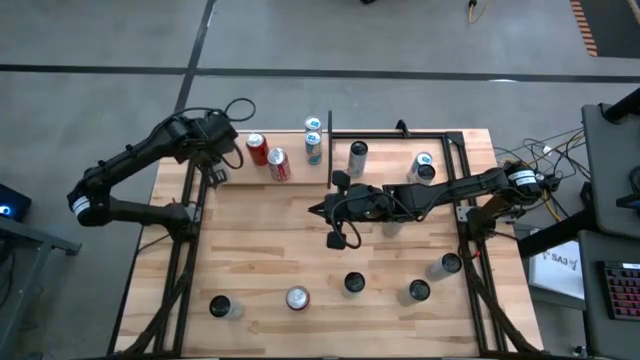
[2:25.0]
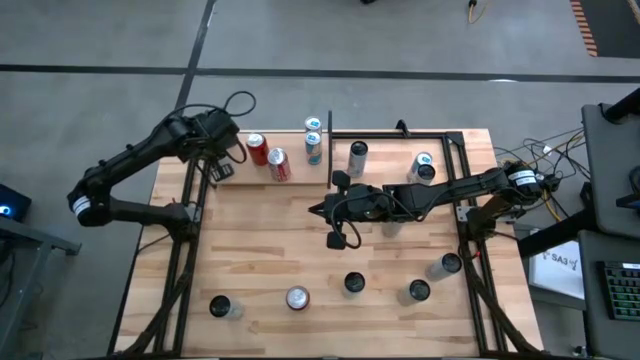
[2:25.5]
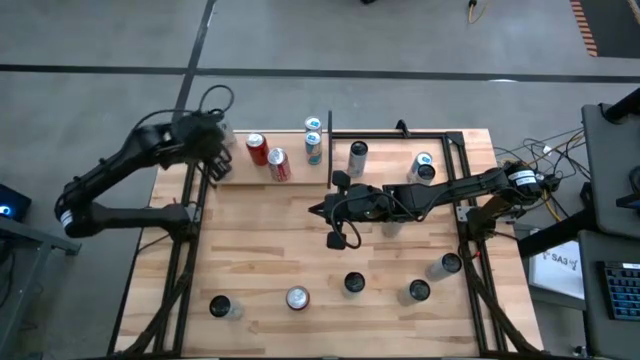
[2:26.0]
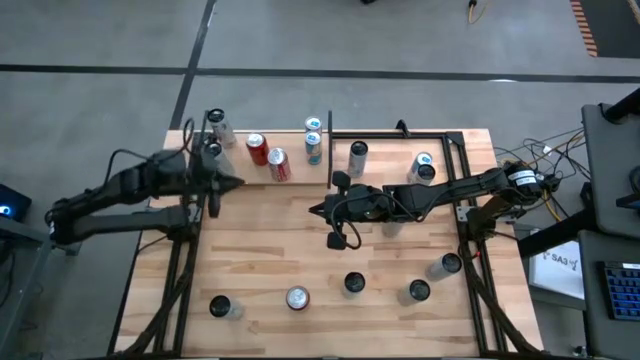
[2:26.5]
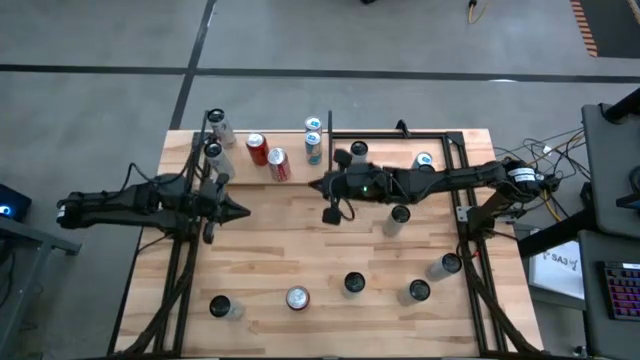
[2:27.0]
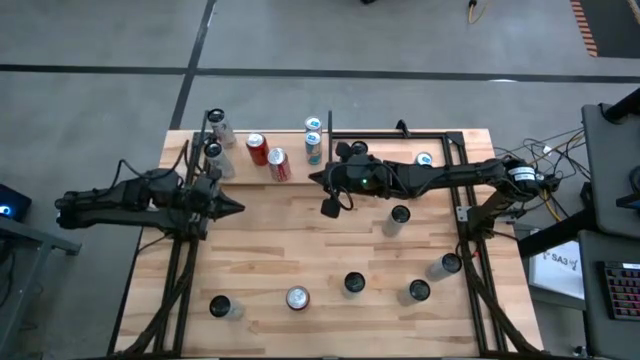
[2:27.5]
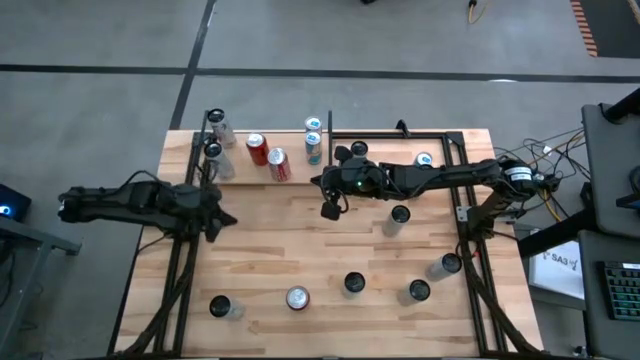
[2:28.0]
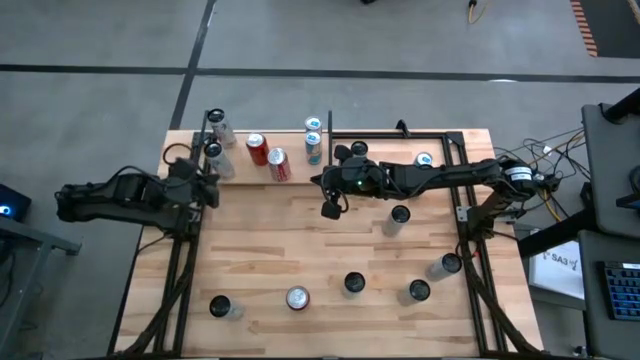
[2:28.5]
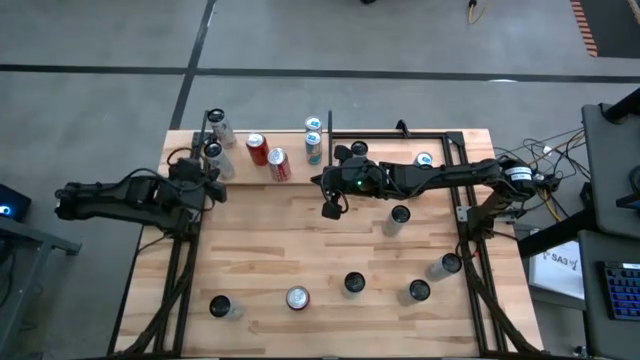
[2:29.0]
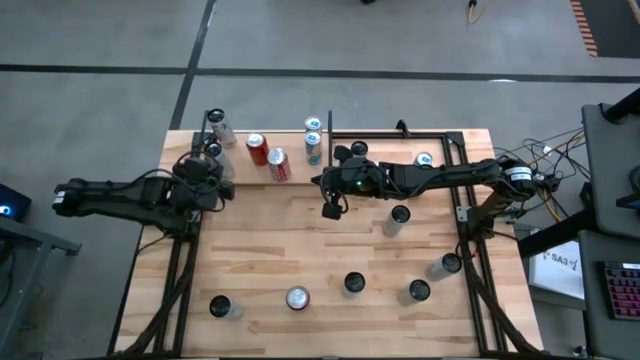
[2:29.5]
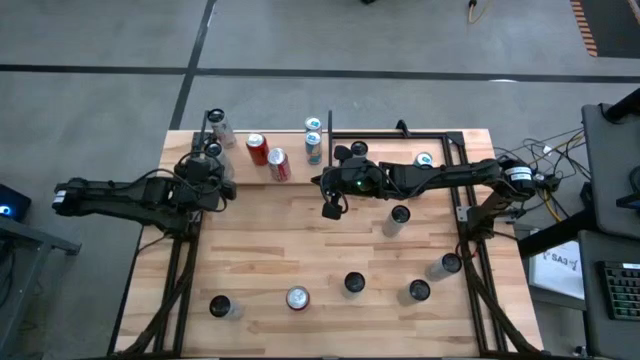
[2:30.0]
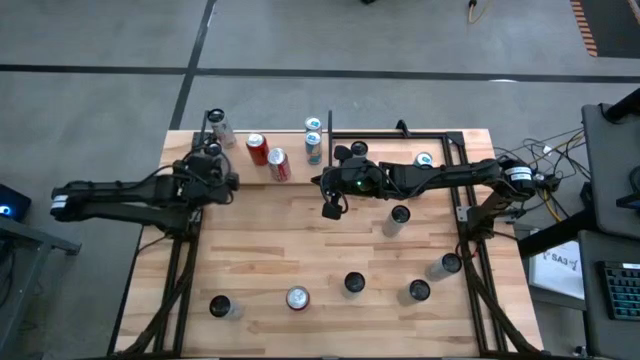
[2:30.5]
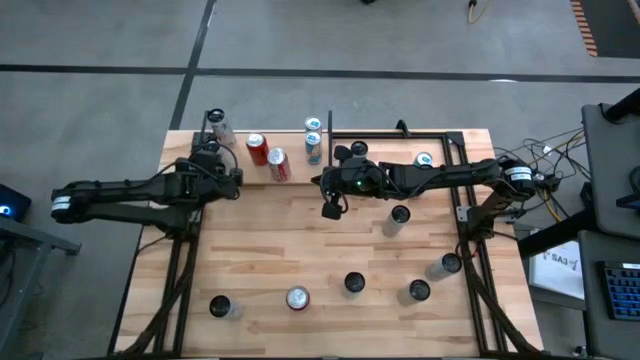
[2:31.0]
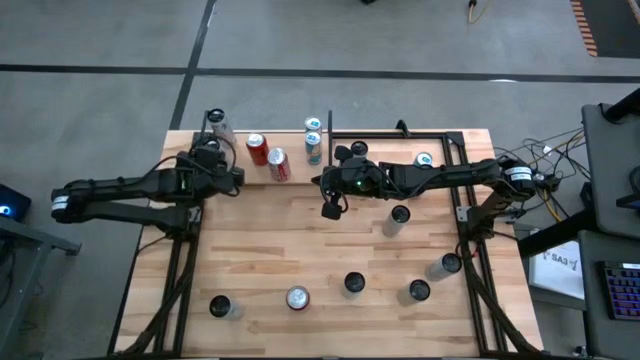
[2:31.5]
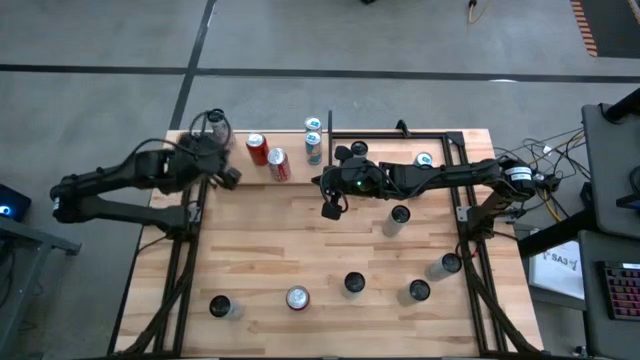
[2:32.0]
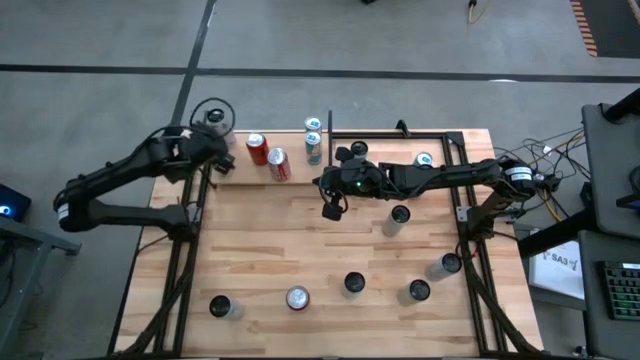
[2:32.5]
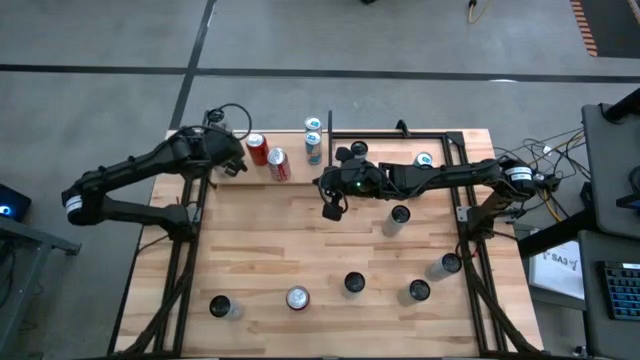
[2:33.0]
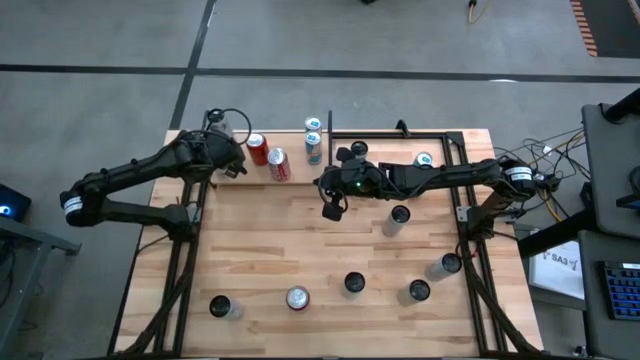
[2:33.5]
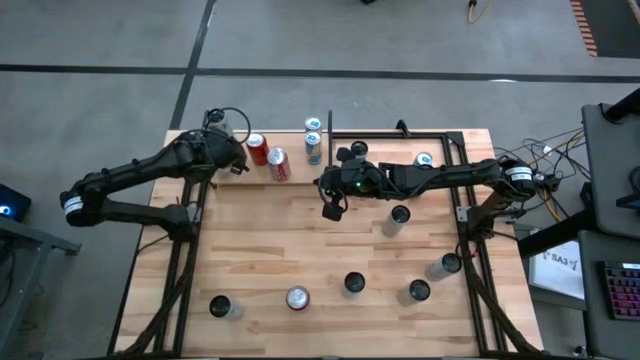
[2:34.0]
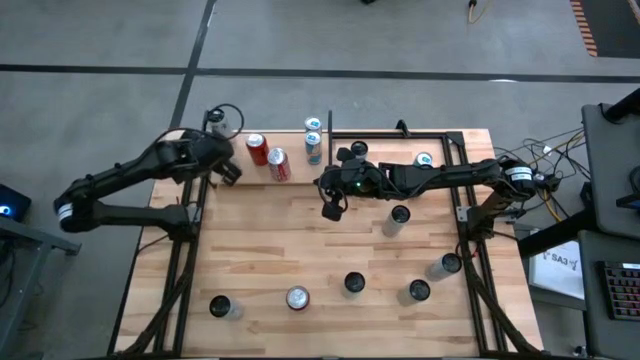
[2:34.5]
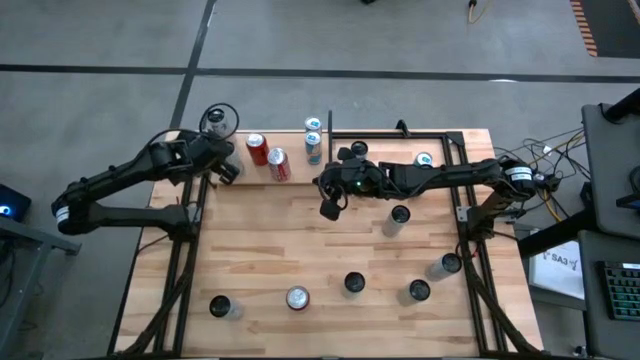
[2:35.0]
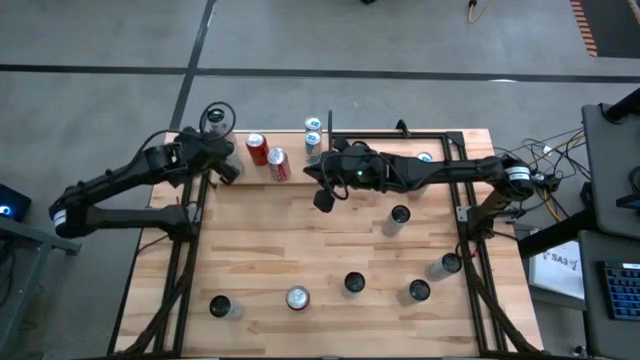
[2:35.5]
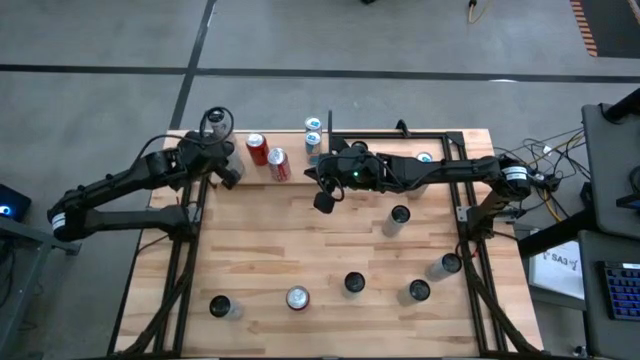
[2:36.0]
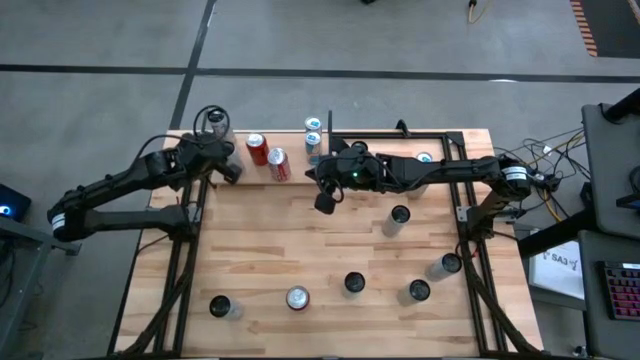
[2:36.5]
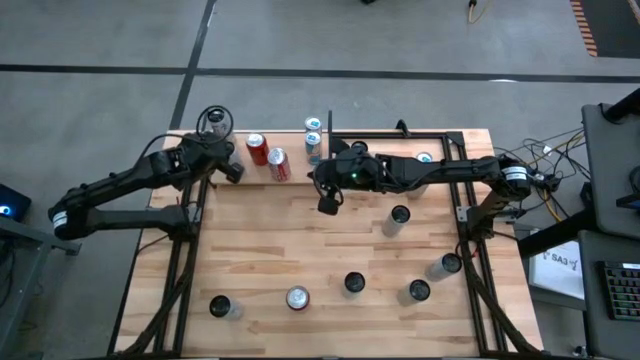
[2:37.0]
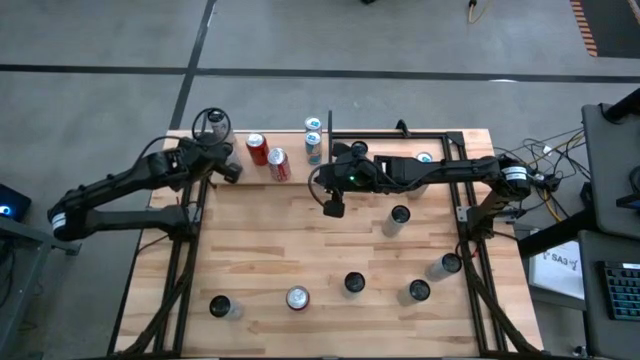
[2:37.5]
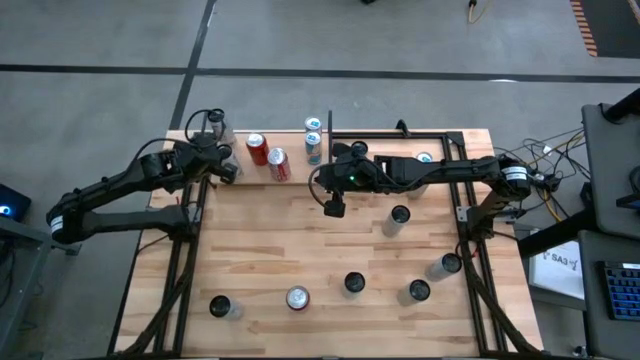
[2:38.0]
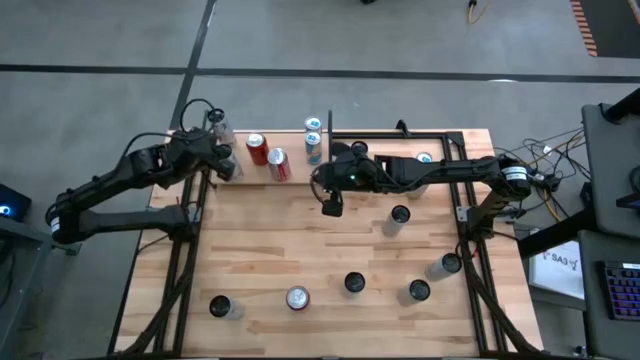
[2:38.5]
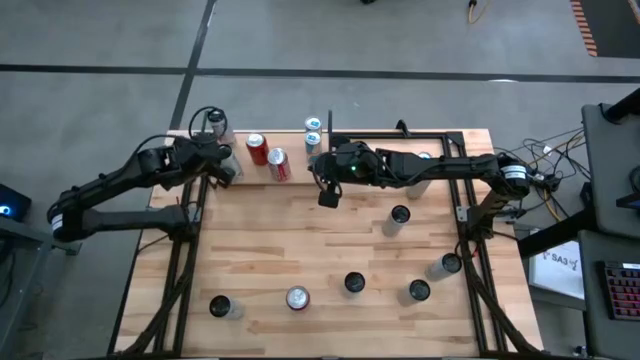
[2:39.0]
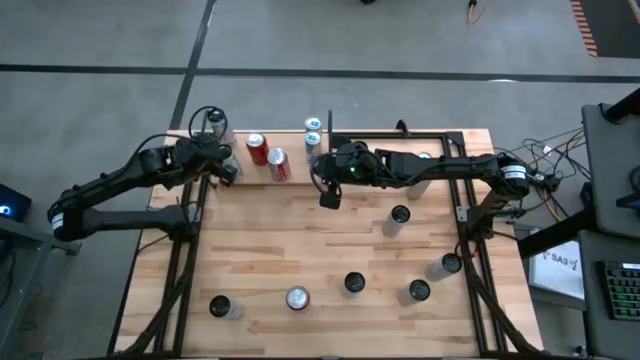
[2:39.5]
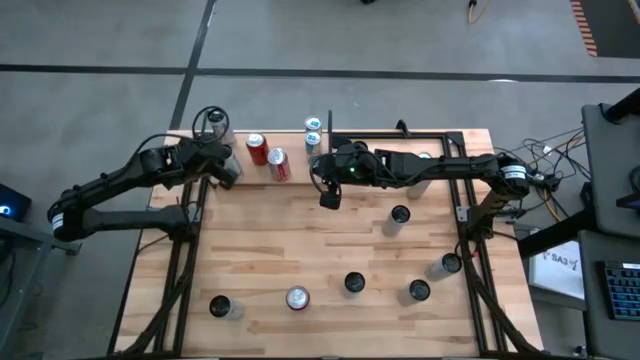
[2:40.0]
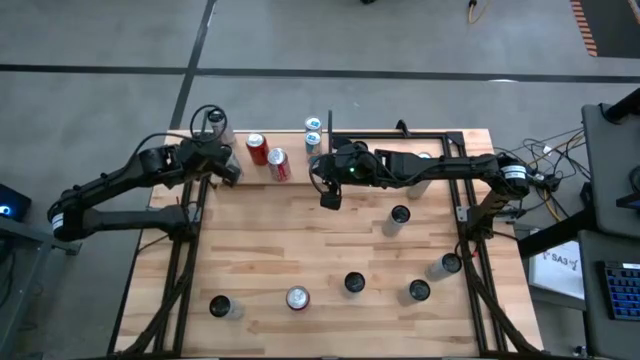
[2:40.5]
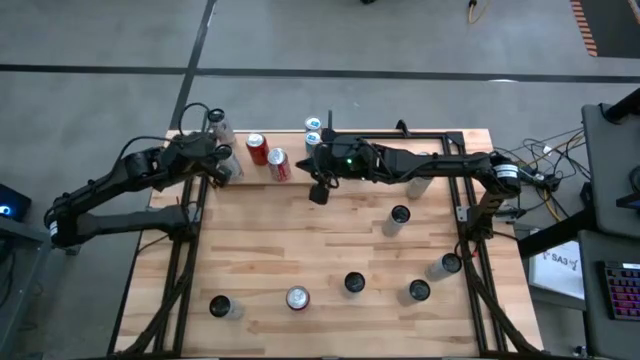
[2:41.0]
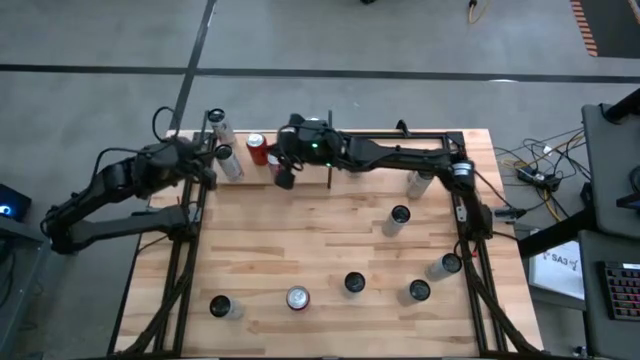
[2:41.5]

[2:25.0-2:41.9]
Task: Place canned beverage on shelf
Put the top white and pink soda can on the shelf aligned with the other white and pink soda can

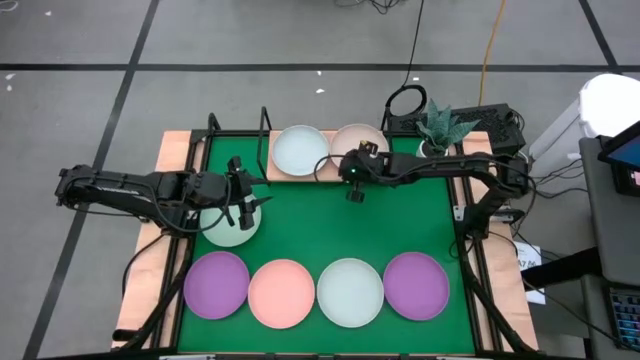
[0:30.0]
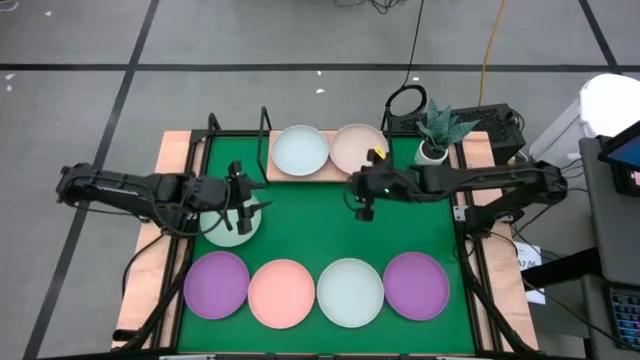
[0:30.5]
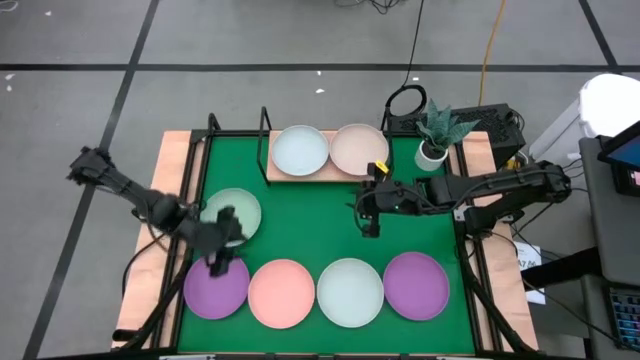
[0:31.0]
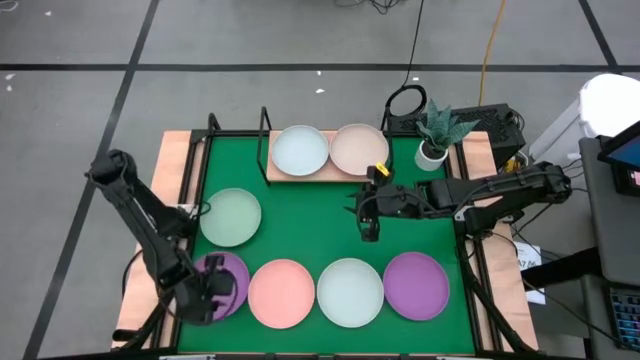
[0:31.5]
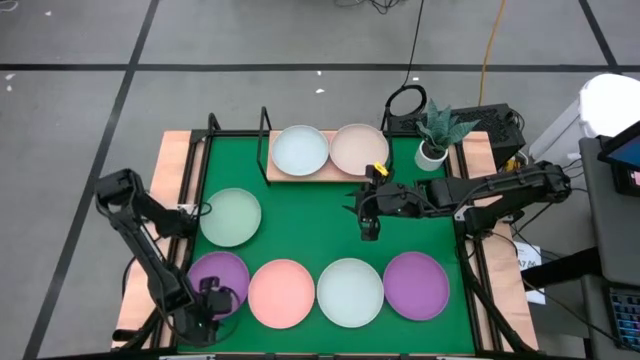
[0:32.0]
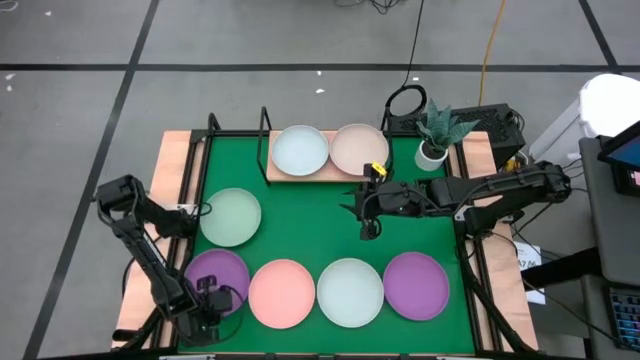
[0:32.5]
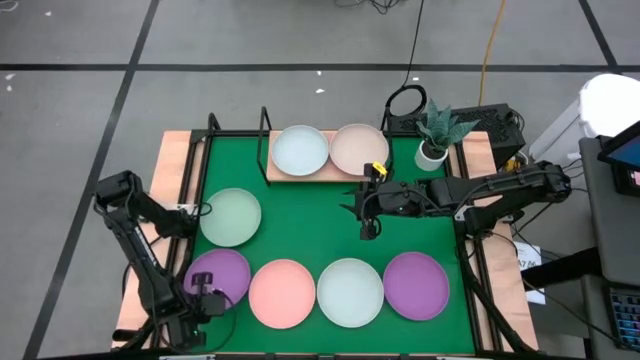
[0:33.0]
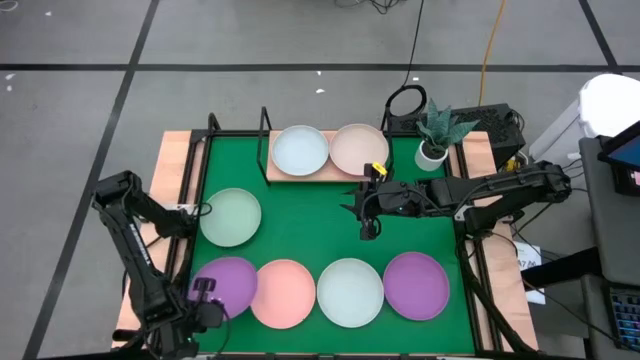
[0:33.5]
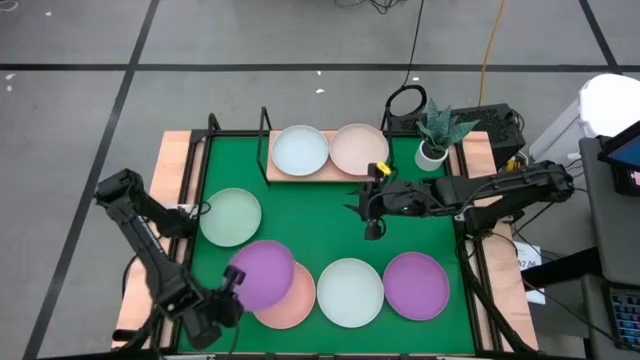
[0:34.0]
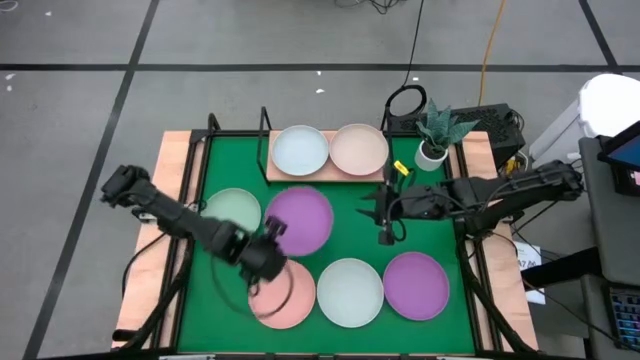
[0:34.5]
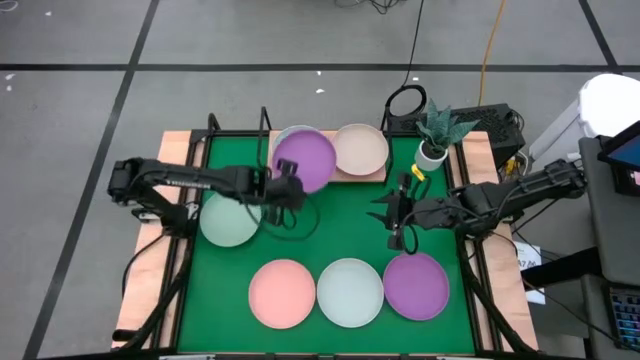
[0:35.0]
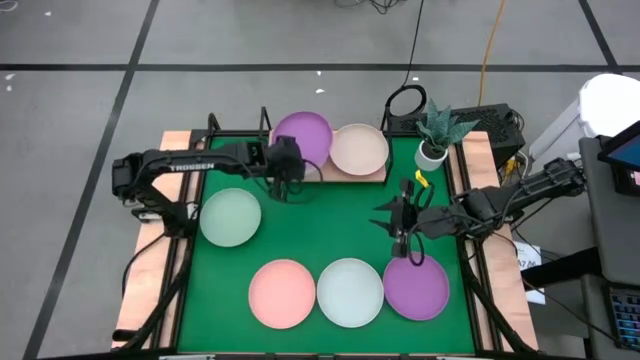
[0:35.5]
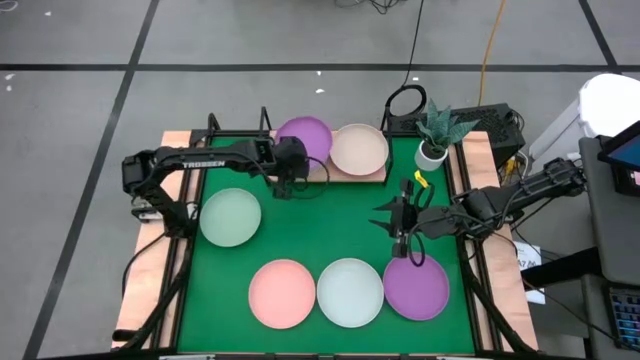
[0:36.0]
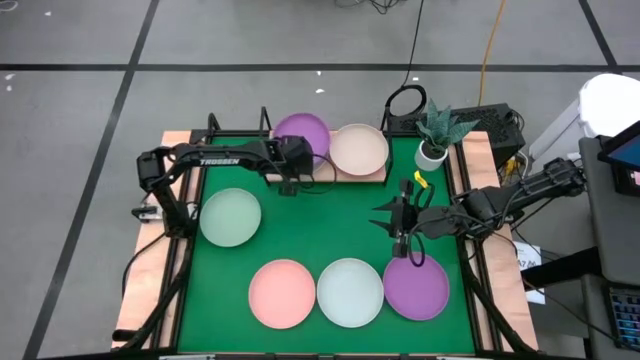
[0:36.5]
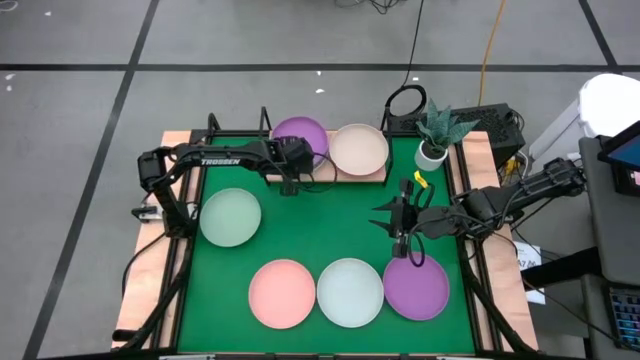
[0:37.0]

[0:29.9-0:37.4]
Task: Place and stack plates onto a shelf
Stack the left purple plate on top of the gray plate on the shelf
